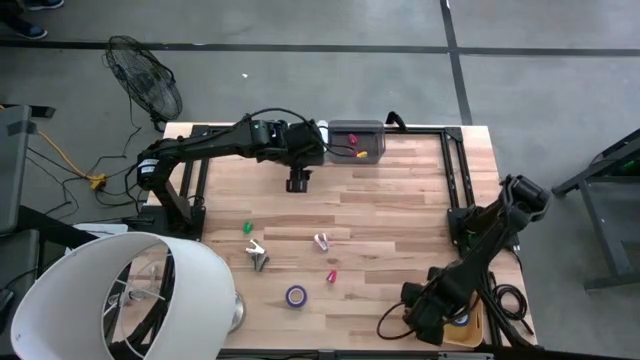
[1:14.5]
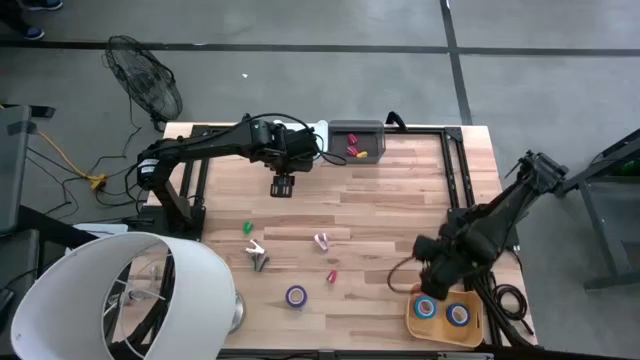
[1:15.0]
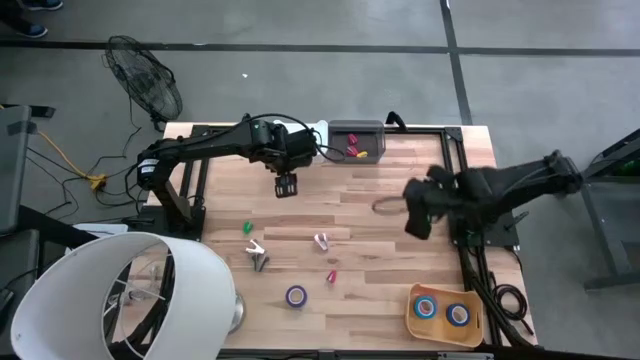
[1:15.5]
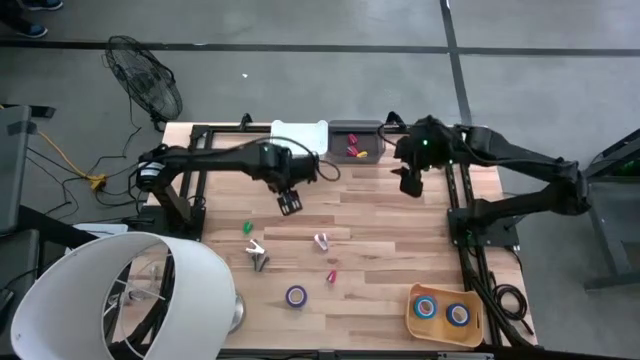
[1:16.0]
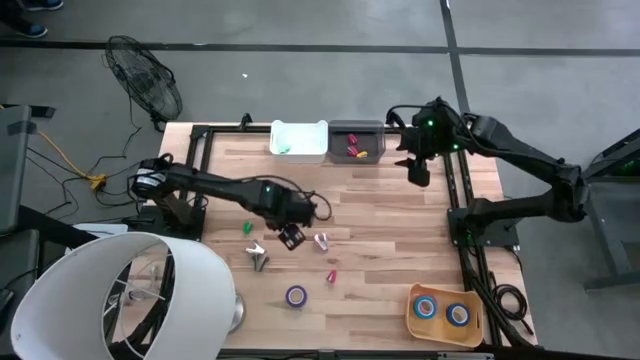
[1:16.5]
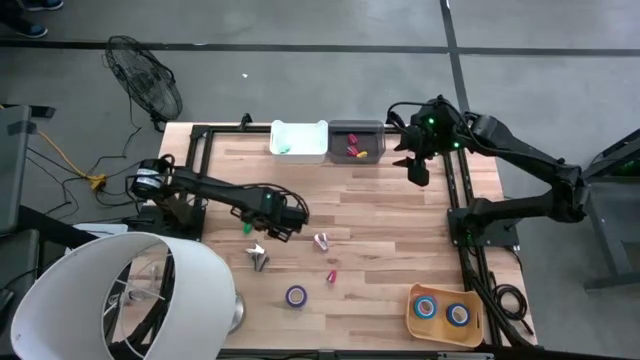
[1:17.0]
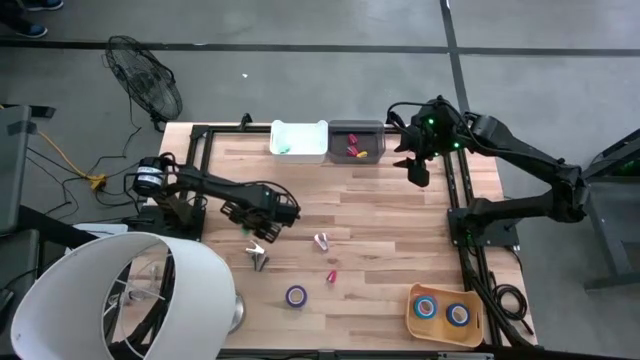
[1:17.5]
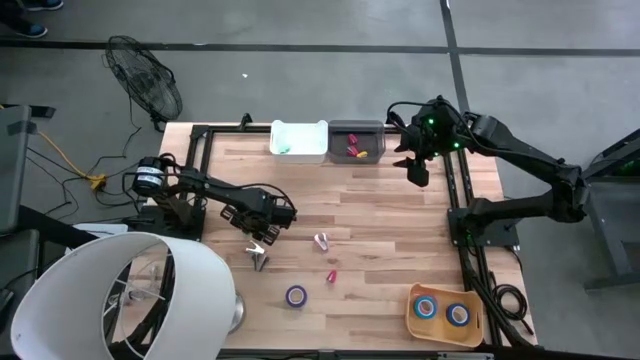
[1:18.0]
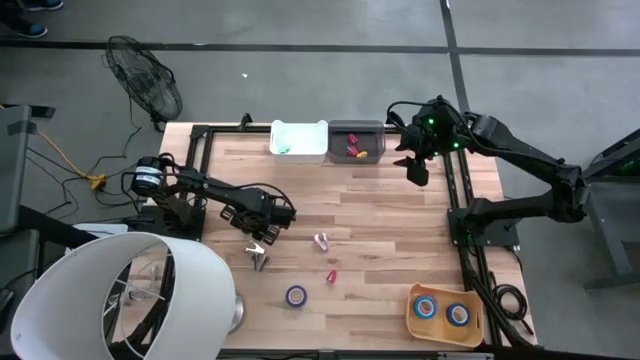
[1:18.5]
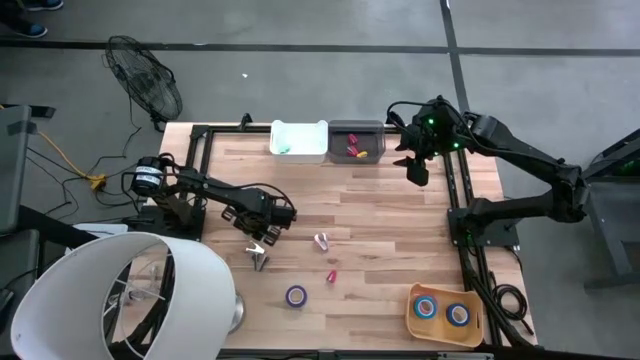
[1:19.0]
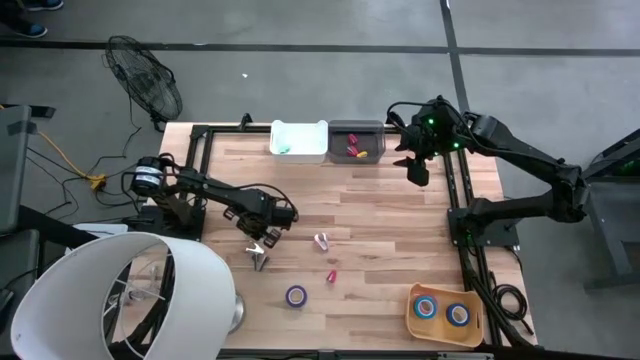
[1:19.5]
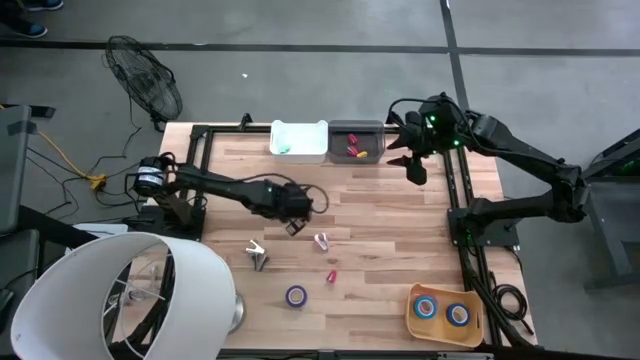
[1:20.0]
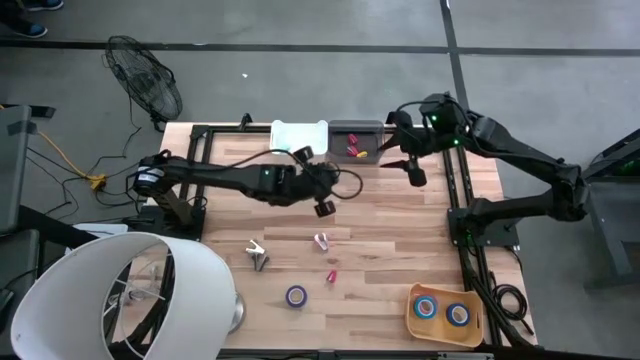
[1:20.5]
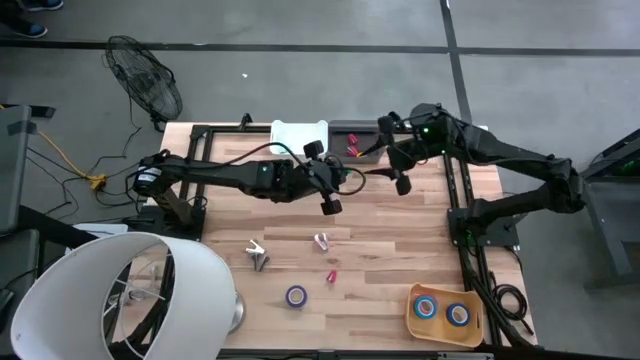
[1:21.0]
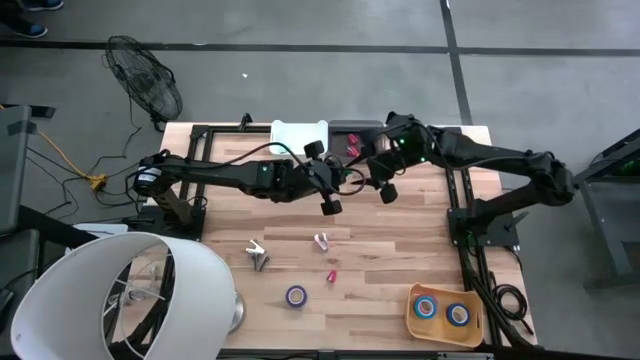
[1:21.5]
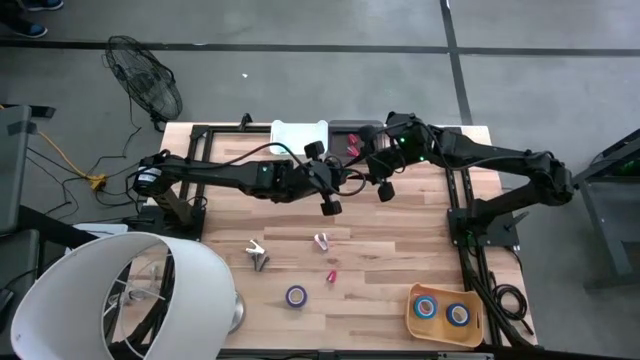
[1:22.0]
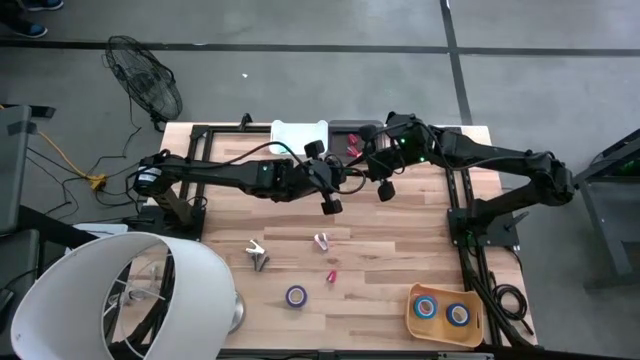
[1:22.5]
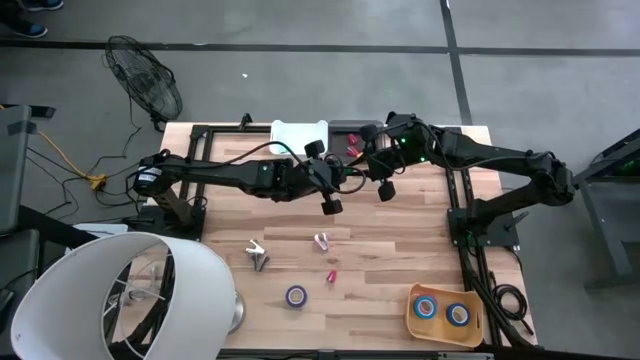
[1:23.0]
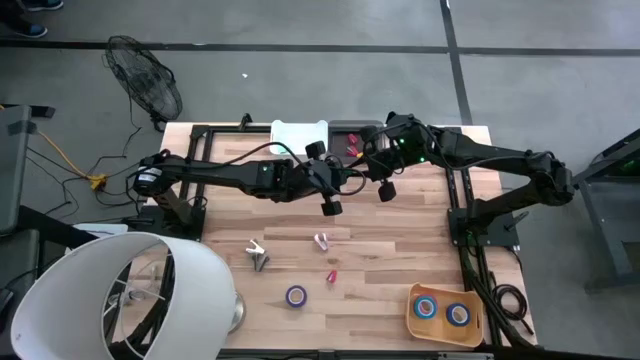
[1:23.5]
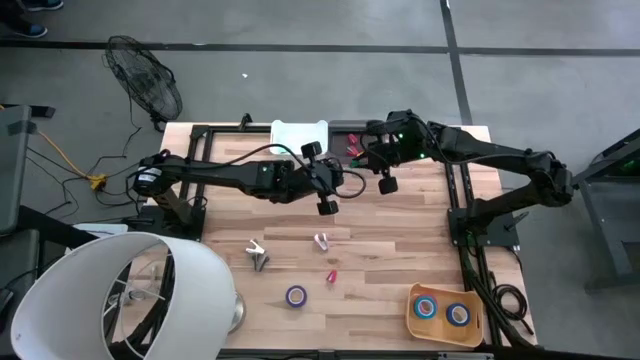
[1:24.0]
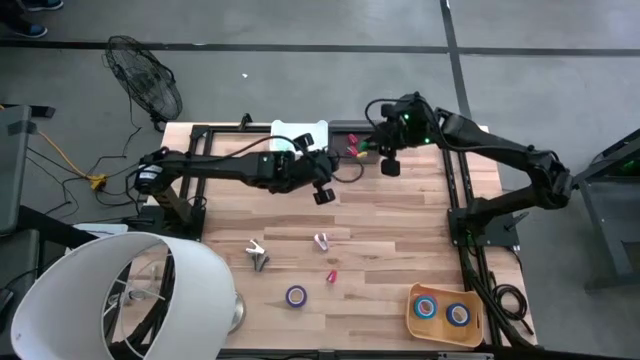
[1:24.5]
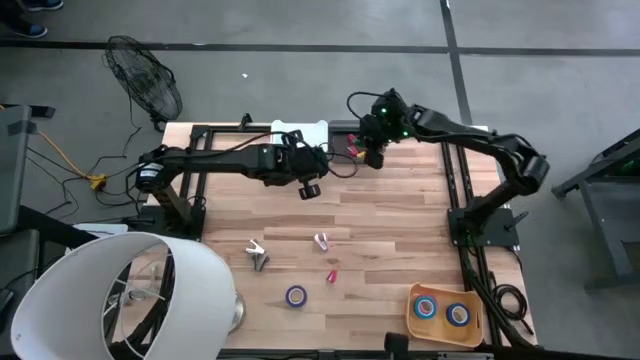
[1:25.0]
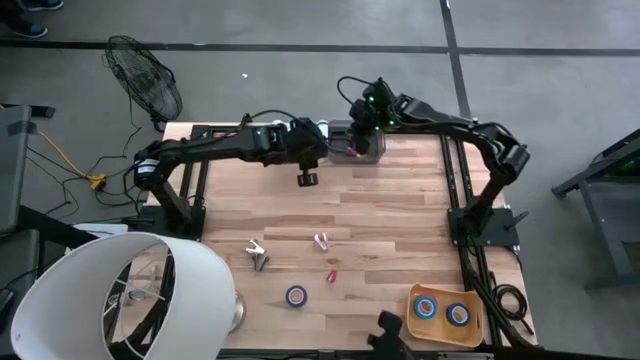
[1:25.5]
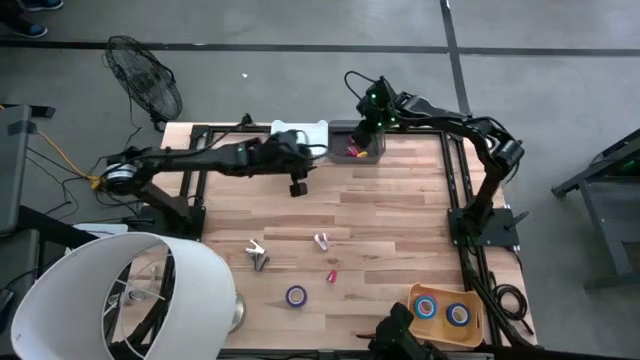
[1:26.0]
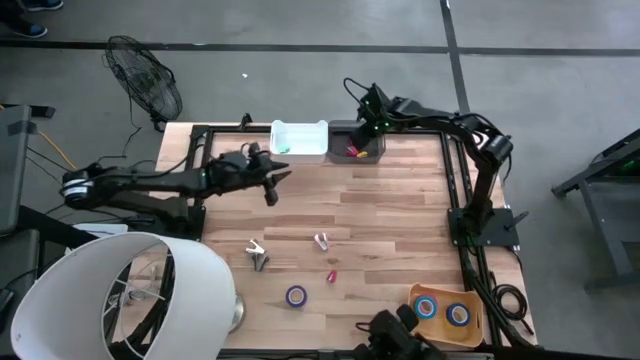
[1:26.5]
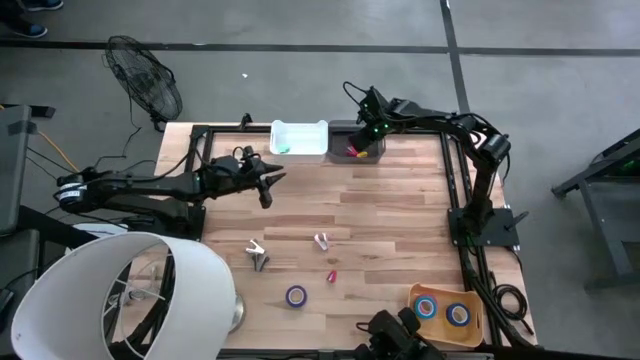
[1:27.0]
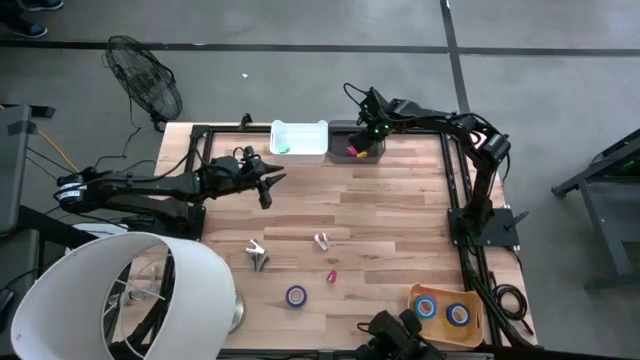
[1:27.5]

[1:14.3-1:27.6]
Task: Pick and place Stapler, Stapler remover, tape
Put the green stapler into the black bin

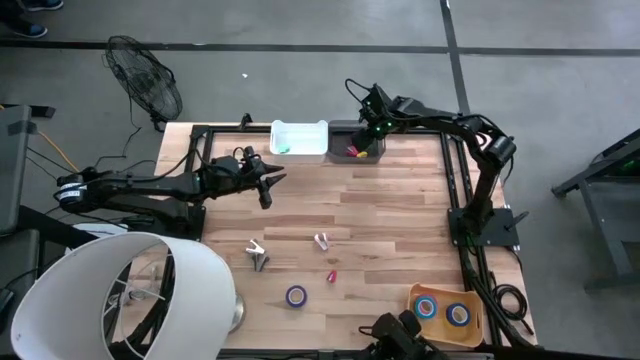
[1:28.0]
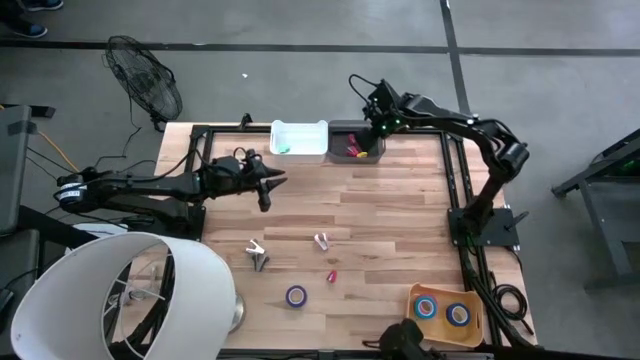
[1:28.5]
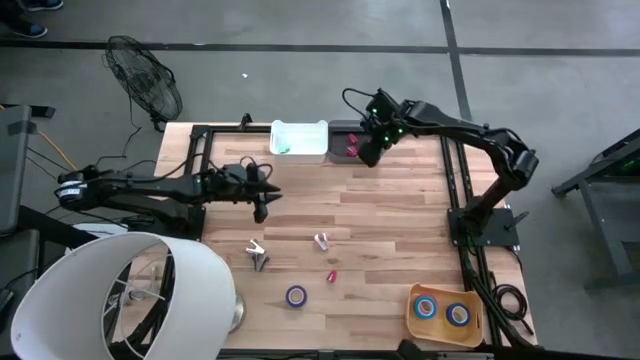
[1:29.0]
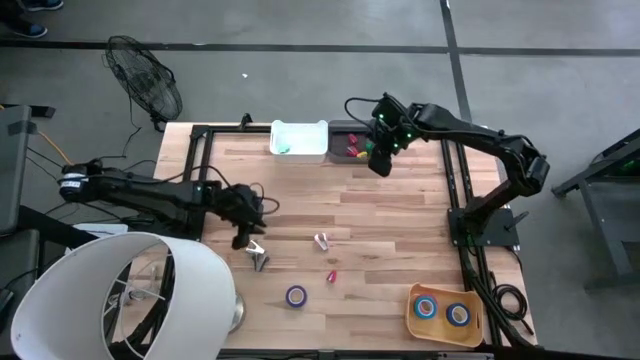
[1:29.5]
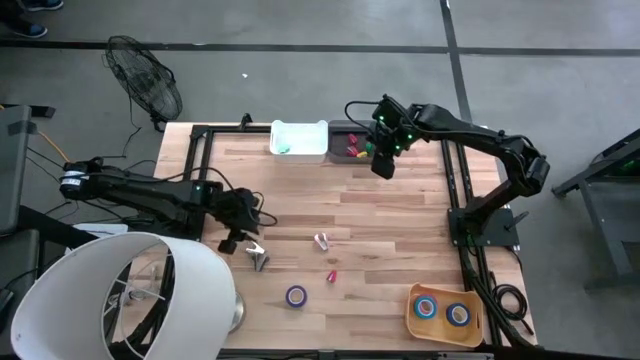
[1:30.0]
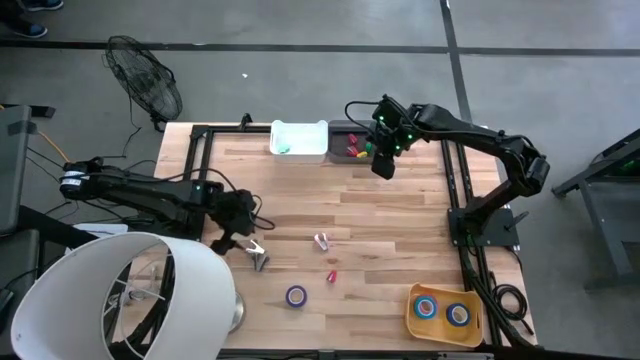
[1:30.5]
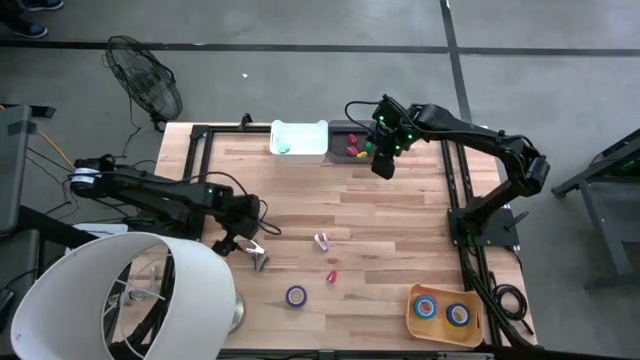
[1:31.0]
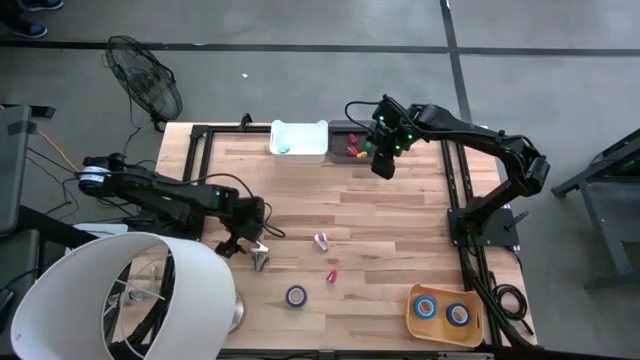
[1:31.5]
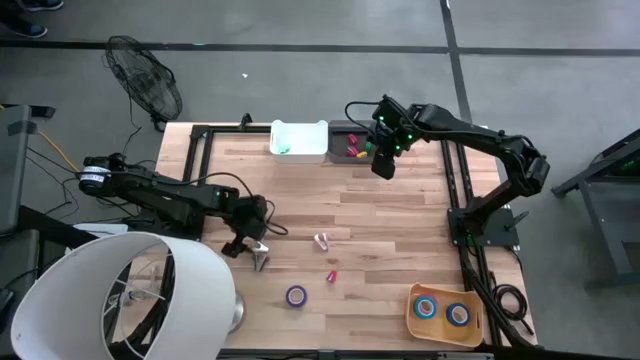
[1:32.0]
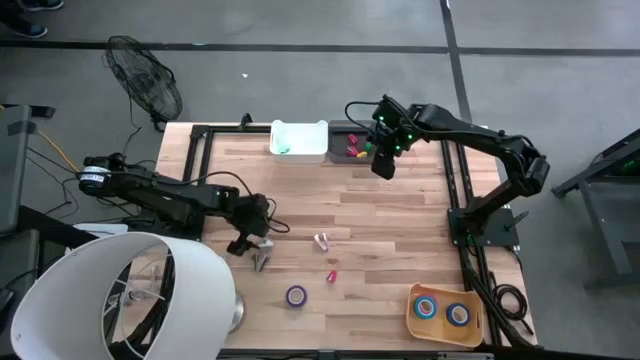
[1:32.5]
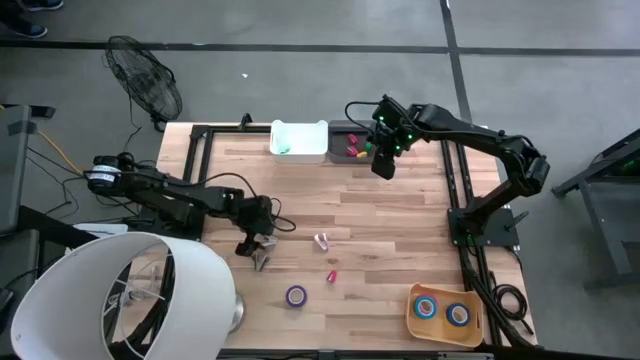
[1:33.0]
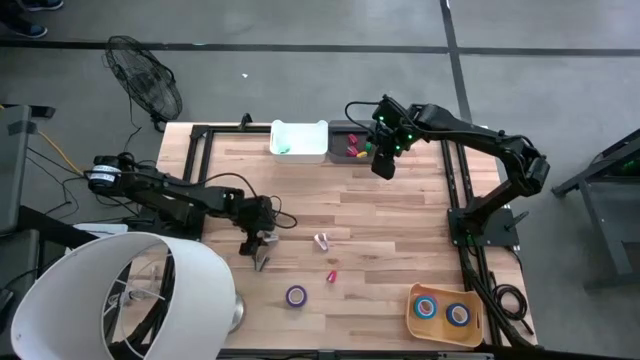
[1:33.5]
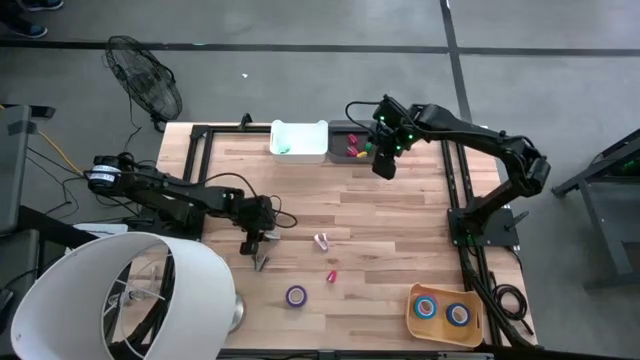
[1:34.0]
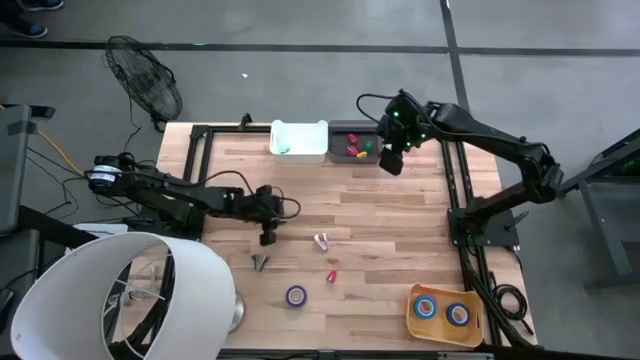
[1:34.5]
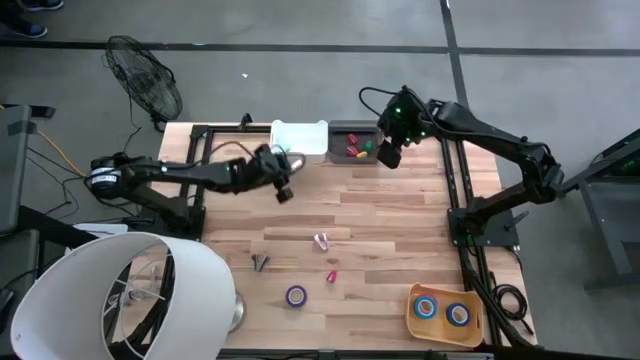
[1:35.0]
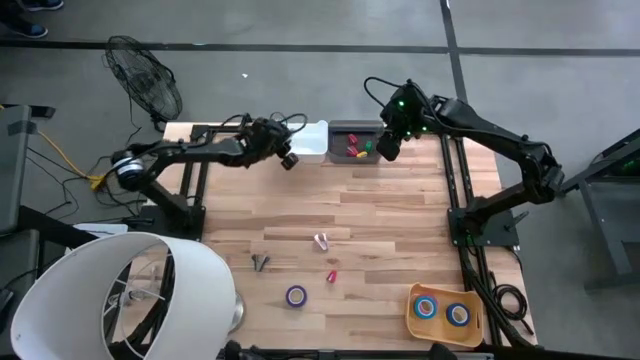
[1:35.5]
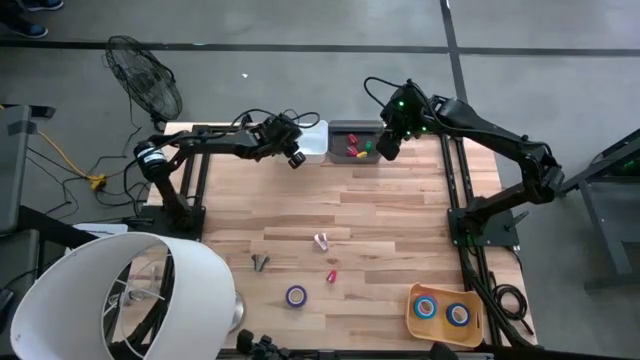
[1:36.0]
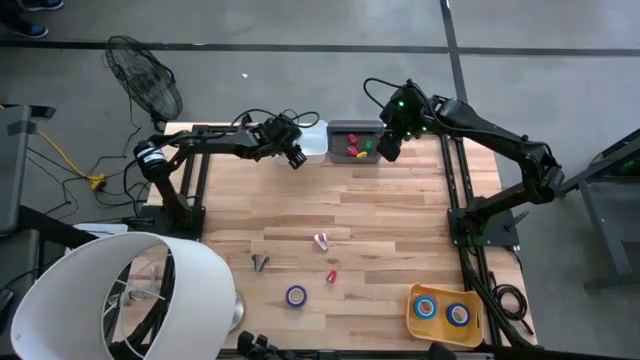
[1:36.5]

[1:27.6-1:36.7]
Put the gray staple remover into the white bin
